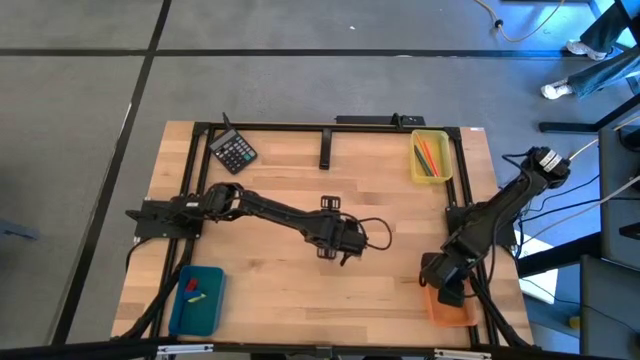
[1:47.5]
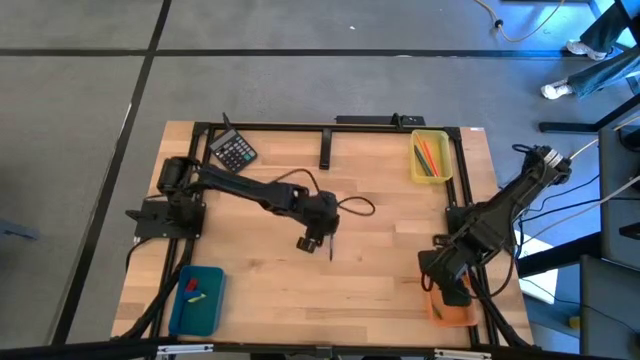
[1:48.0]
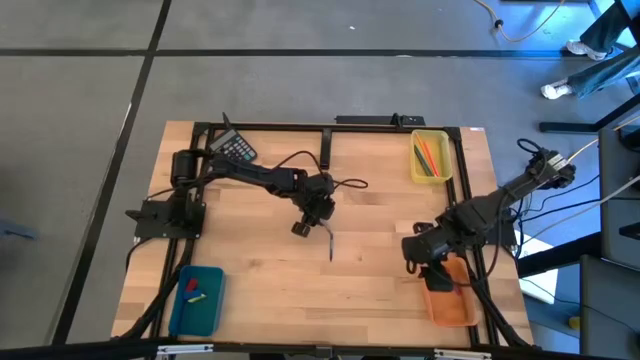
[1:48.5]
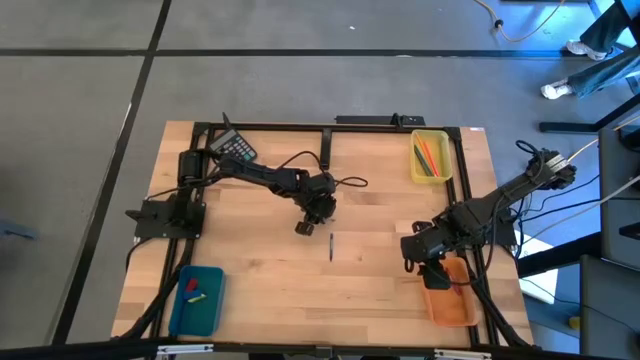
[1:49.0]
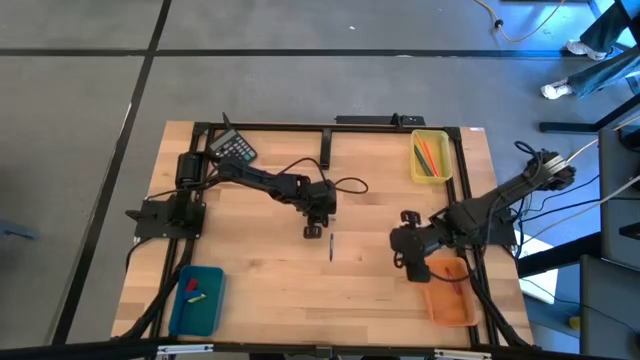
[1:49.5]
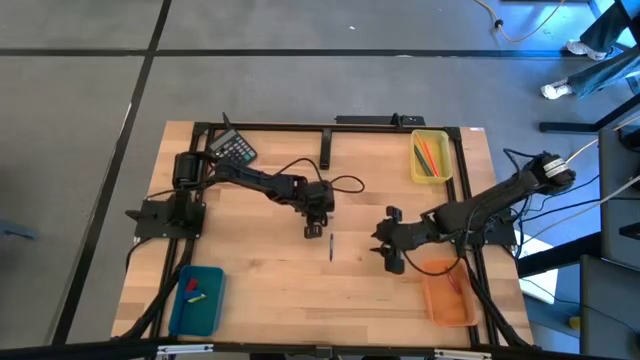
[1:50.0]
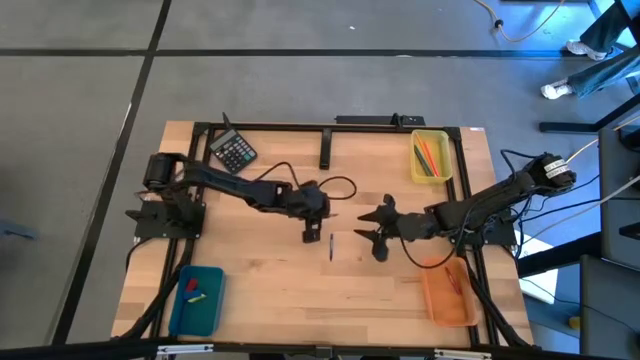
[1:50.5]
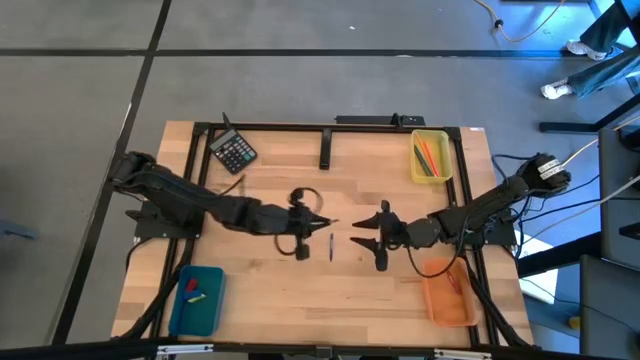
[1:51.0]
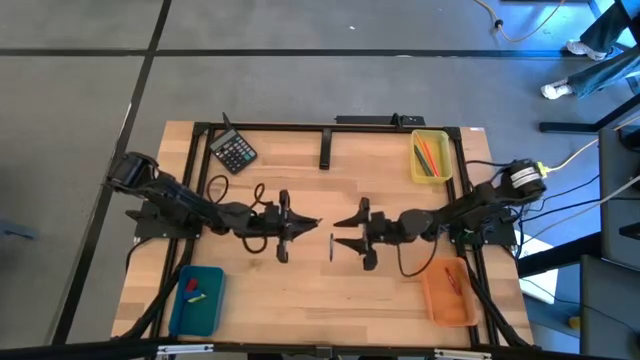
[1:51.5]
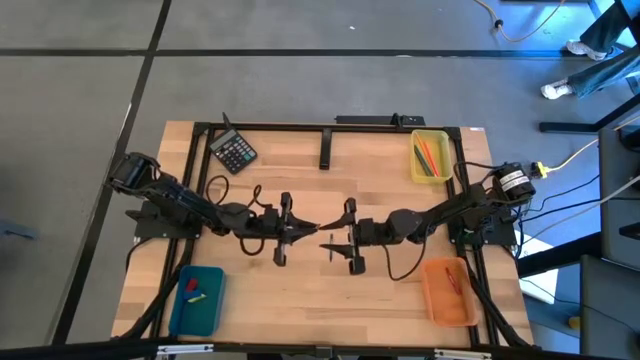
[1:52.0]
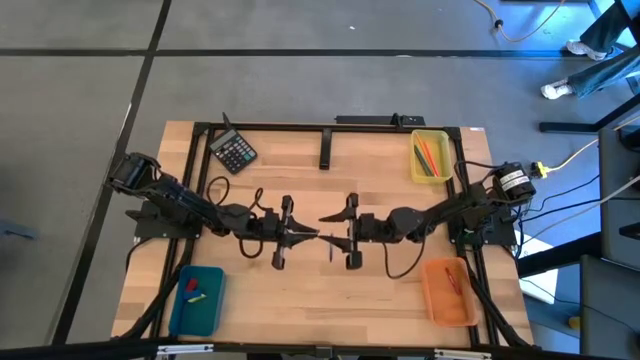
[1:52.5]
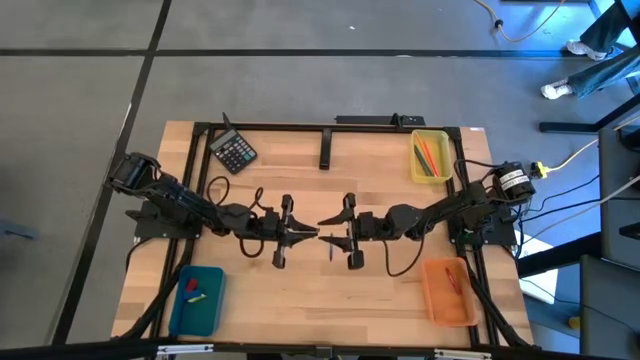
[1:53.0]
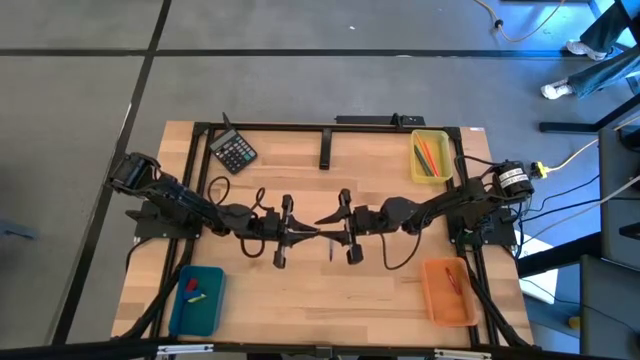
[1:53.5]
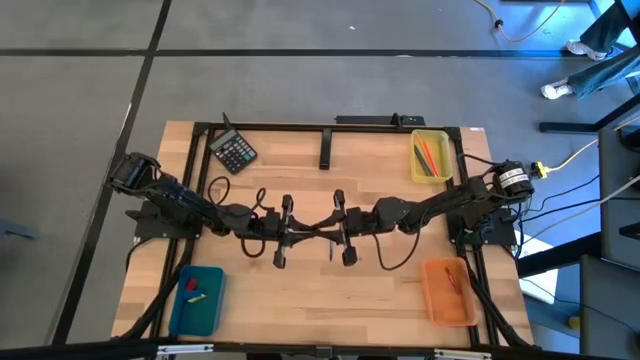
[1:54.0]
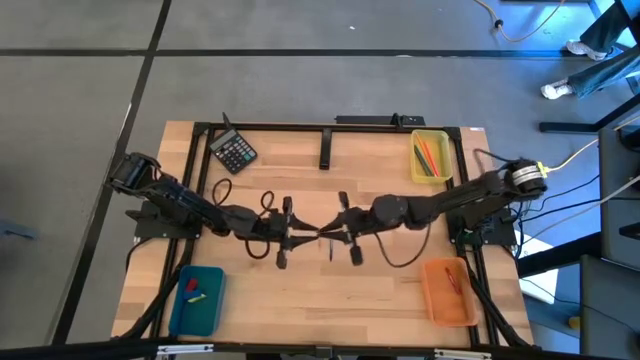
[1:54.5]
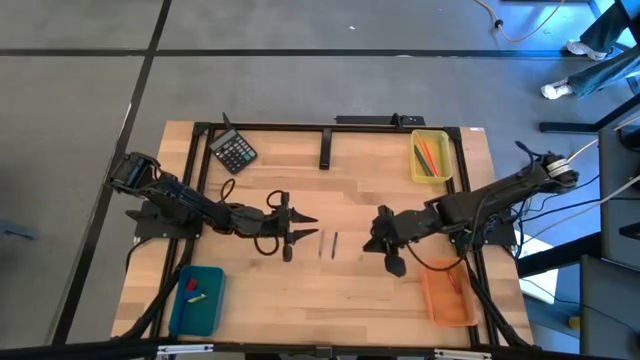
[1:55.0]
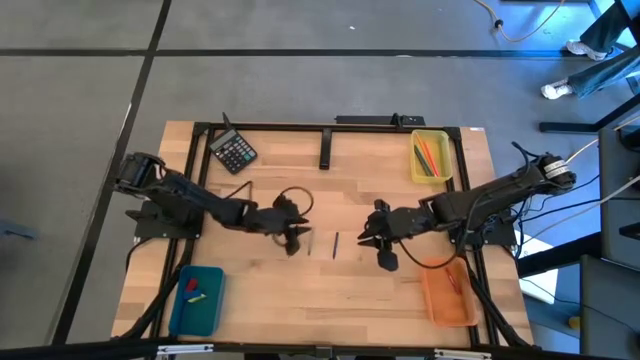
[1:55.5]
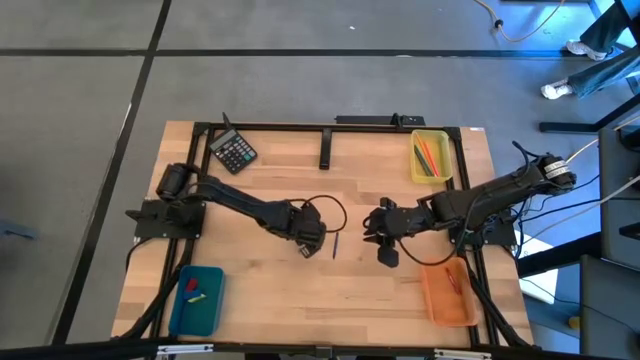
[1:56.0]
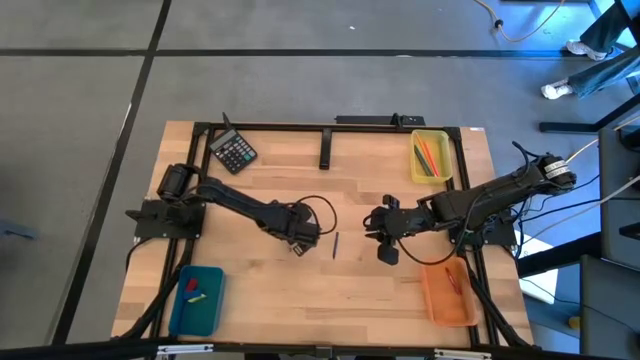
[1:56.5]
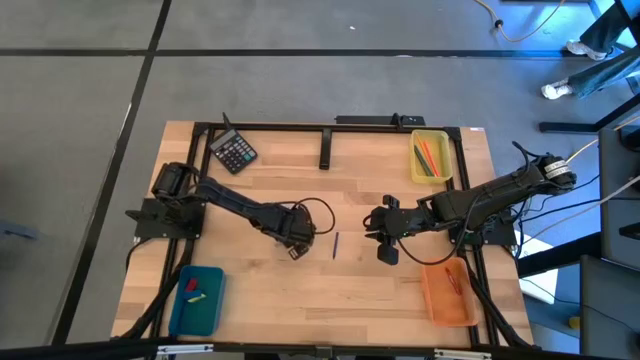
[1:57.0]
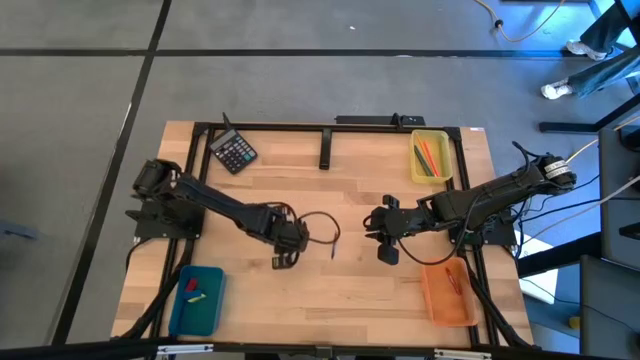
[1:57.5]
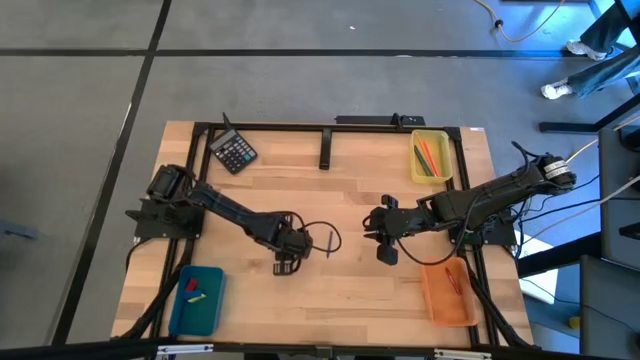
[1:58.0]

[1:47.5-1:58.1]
Task: Sort crayons/erasers/pens/pencils in bins
Put the gray crayon into the orange bin

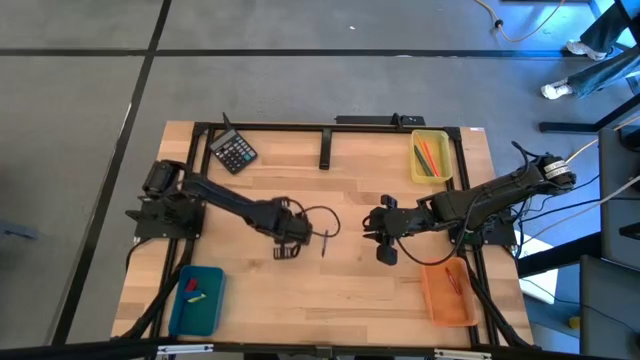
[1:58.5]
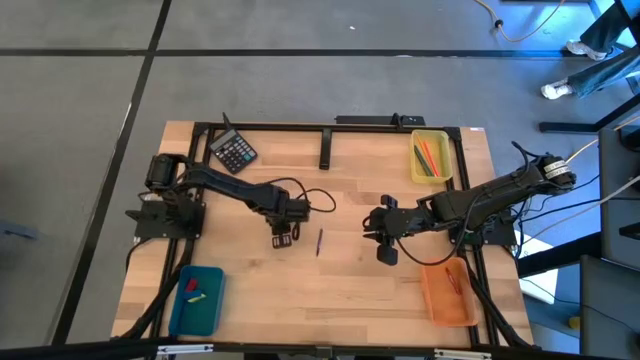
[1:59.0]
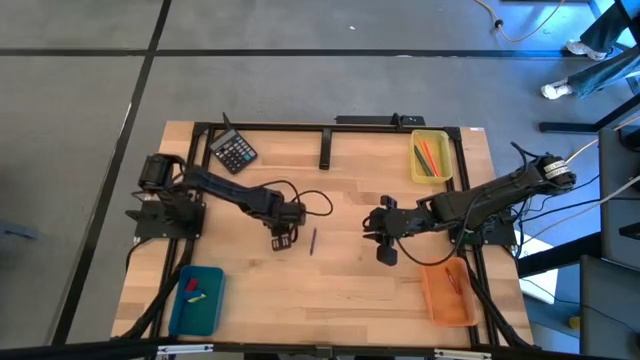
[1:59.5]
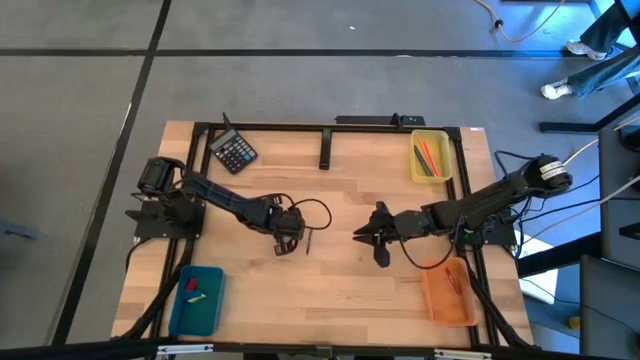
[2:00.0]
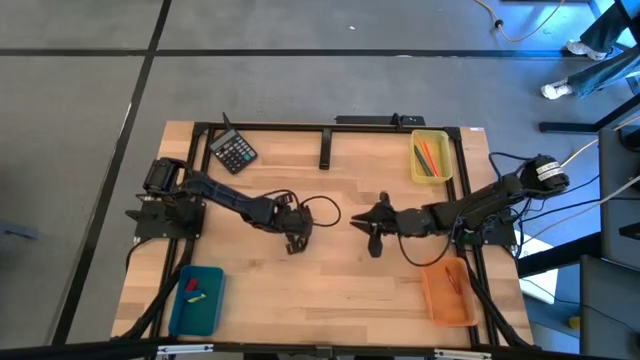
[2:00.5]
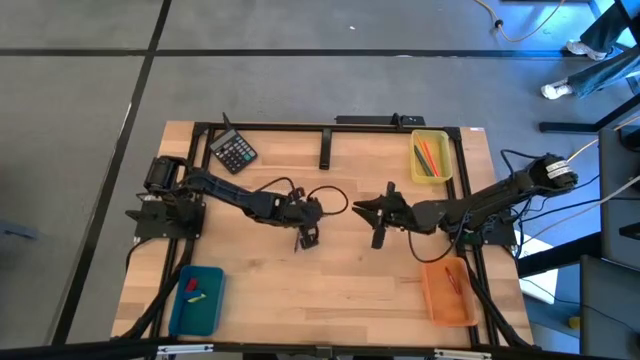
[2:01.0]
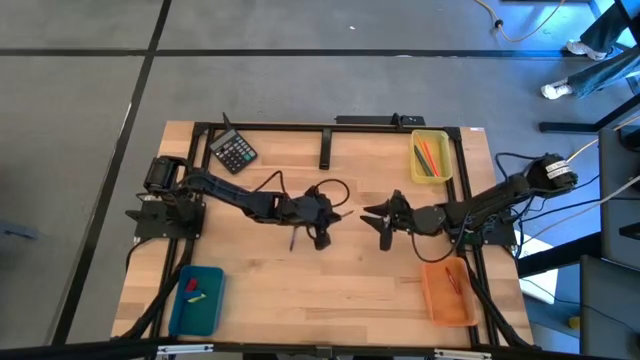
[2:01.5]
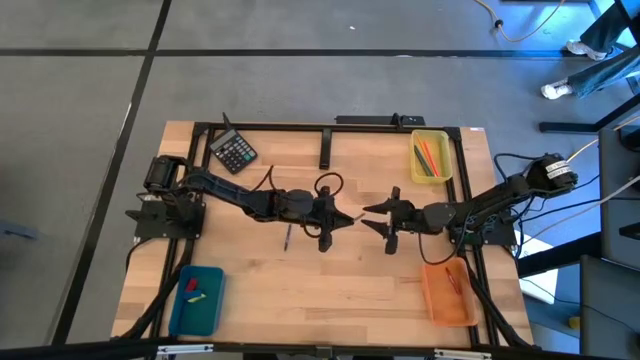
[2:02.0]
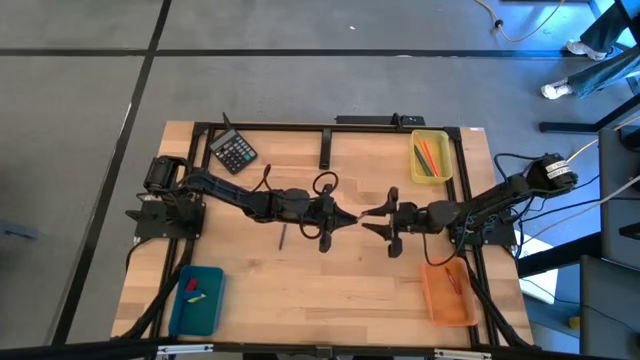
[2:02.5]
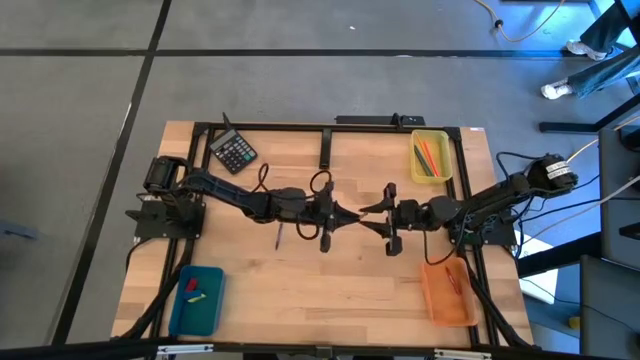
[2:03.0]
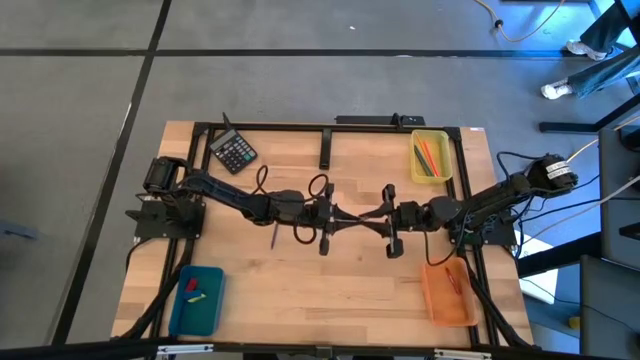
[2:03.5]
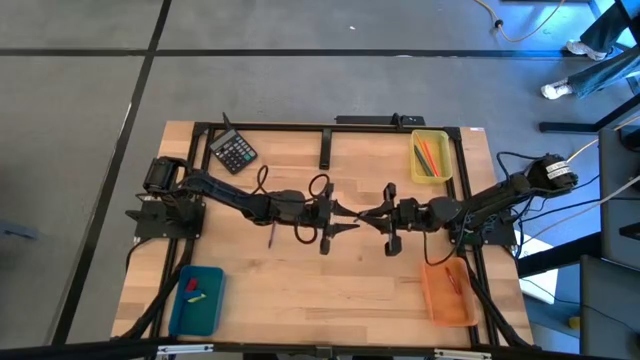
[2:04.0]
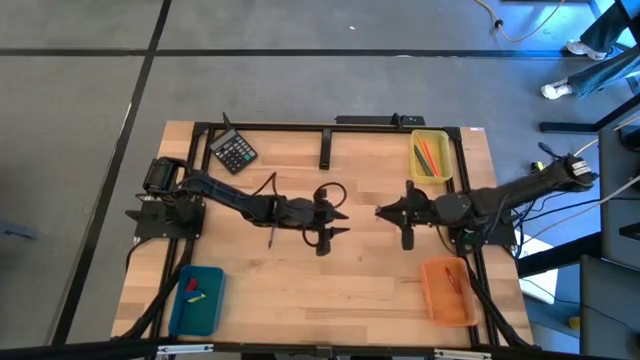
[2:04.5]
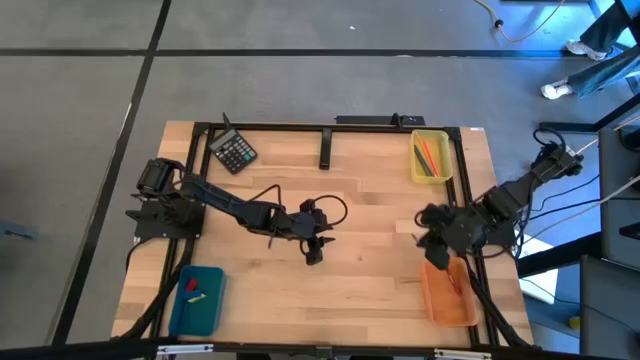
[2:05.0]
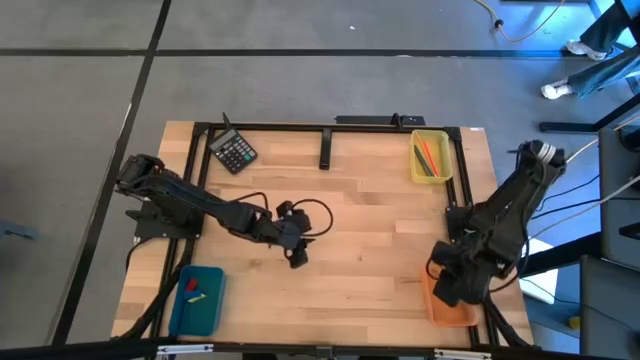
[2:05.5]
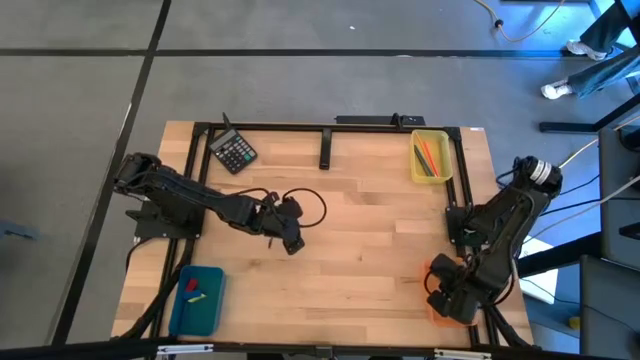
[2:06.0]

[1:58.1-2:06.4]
Put the gray crayon into the orange bin

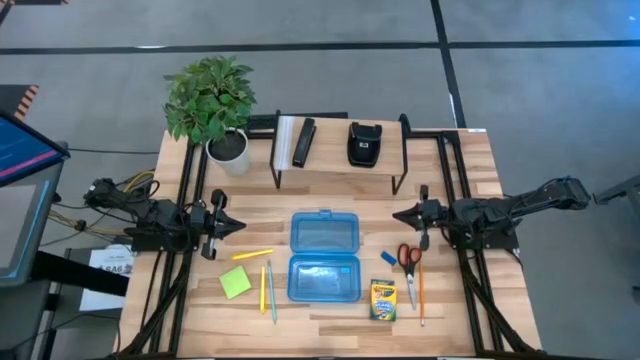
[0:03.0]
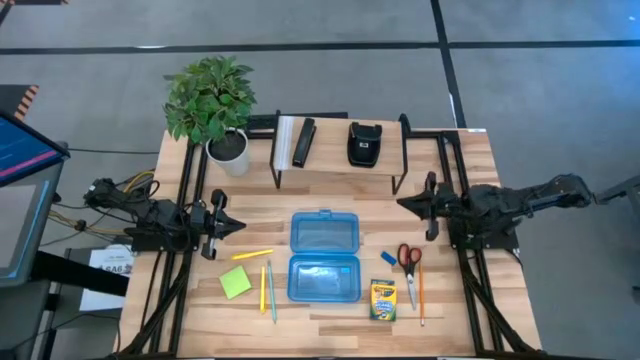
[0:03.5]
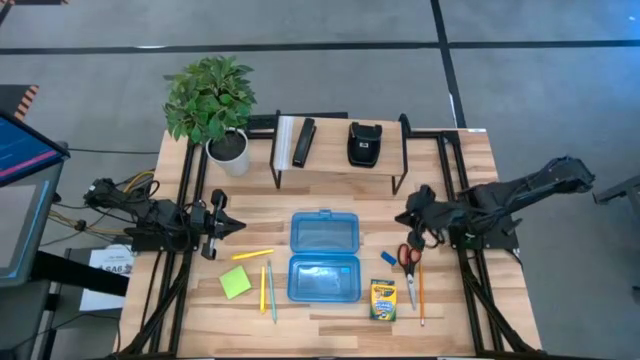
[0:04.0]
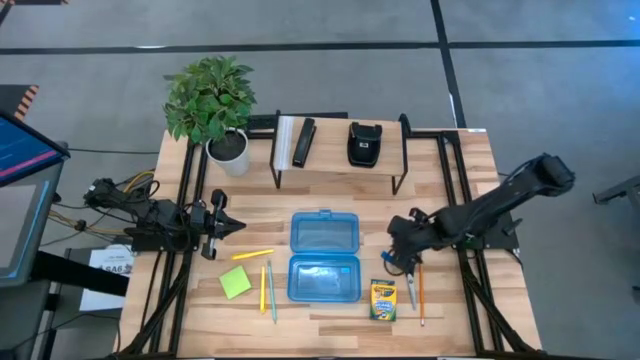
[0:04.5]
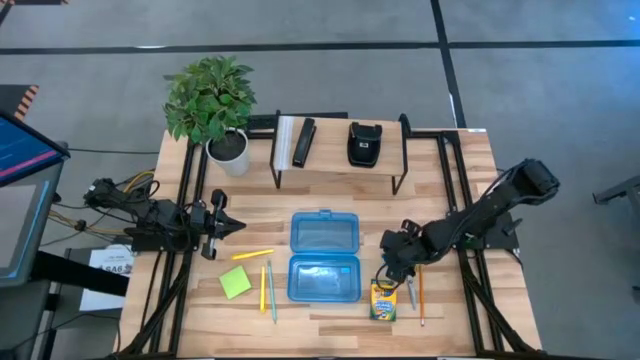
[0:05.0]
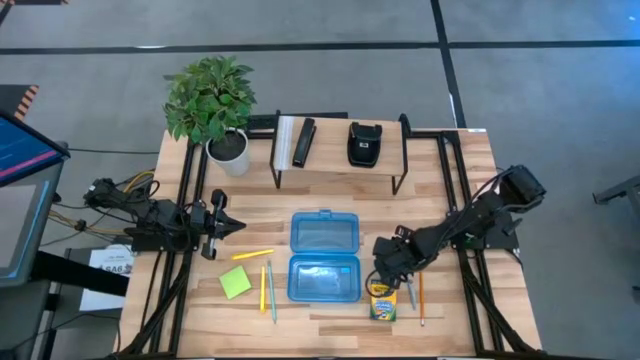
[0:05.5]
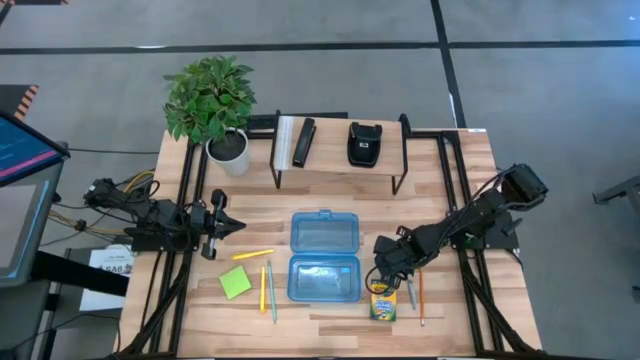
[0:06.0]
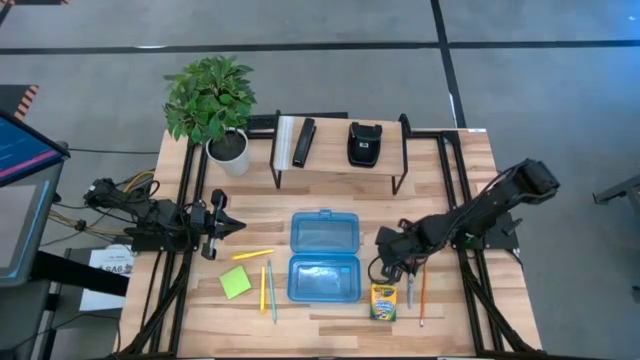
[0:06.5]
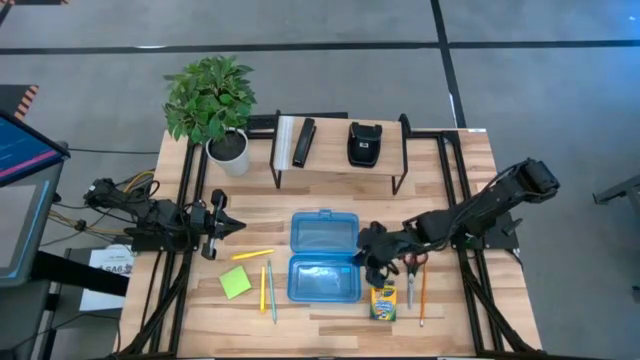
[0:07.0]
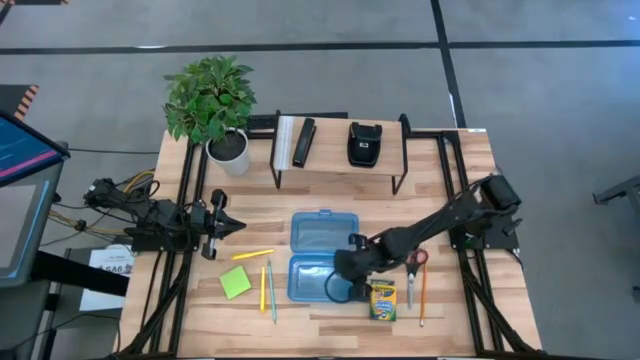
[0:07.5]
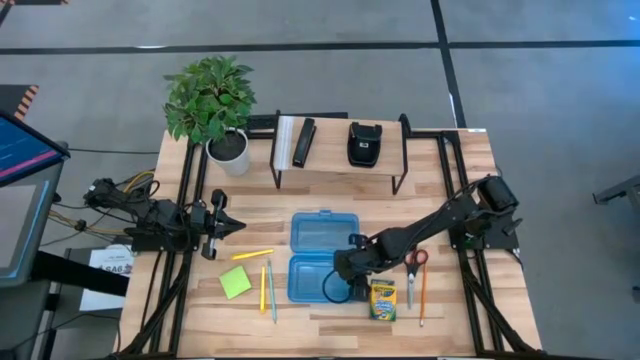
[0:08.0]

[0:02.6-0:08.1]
Task: Pack school essentials
Put the eraser into the supply box
